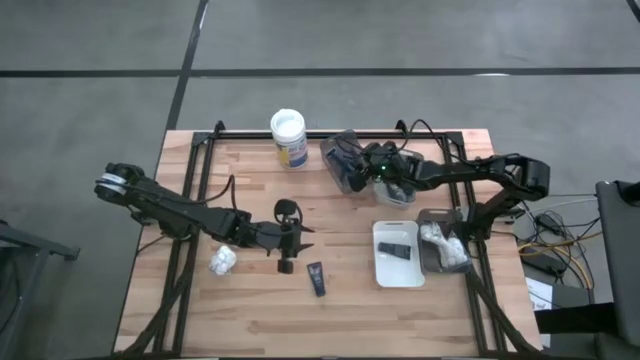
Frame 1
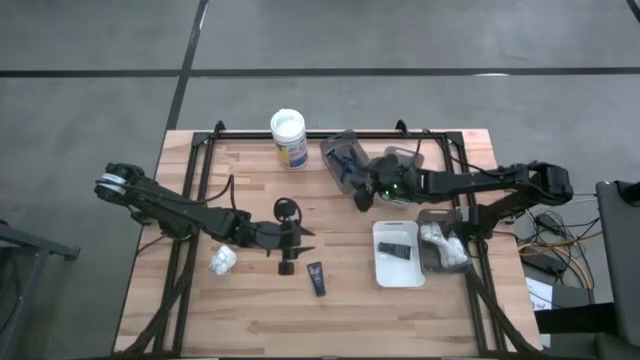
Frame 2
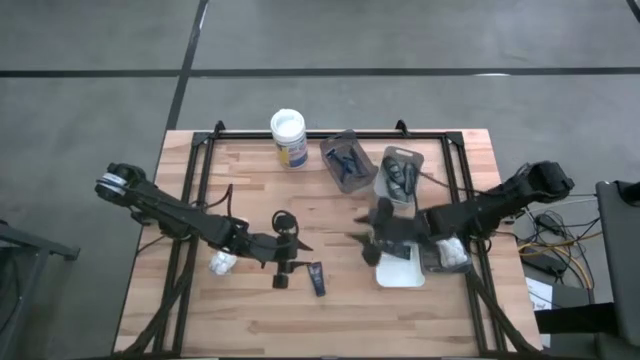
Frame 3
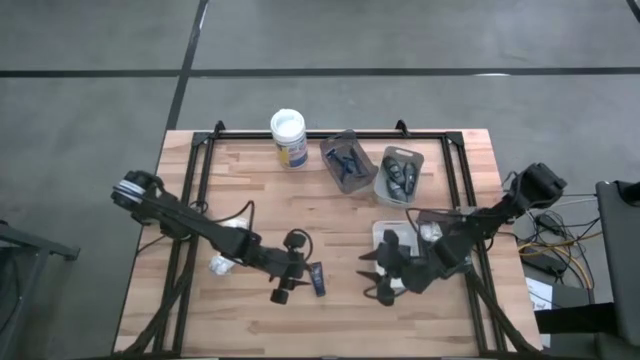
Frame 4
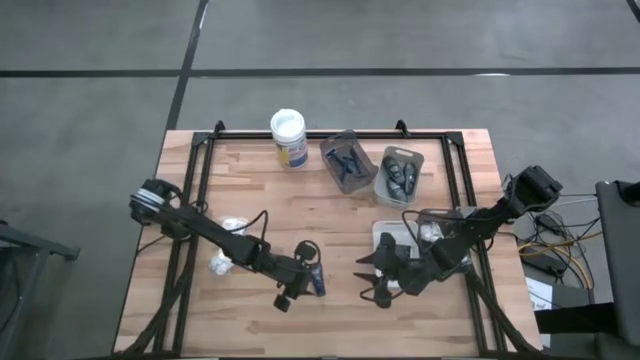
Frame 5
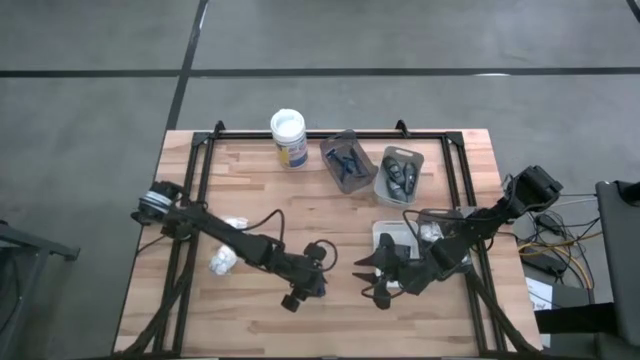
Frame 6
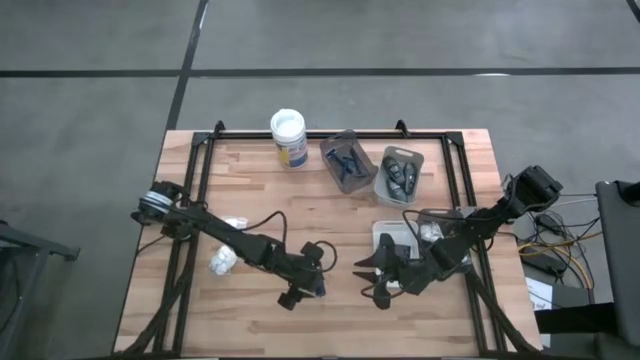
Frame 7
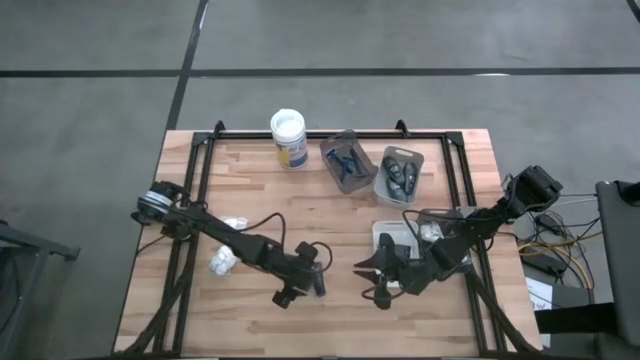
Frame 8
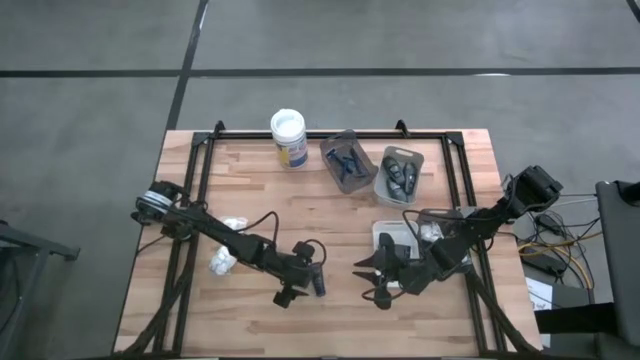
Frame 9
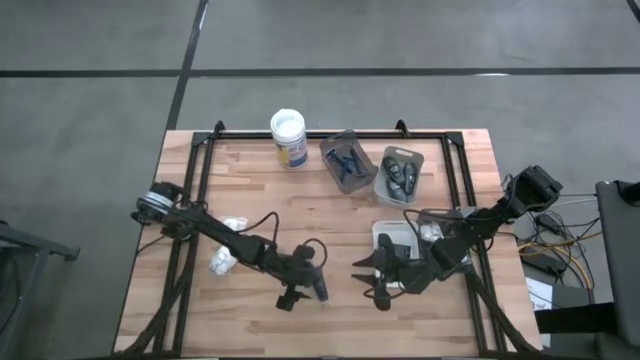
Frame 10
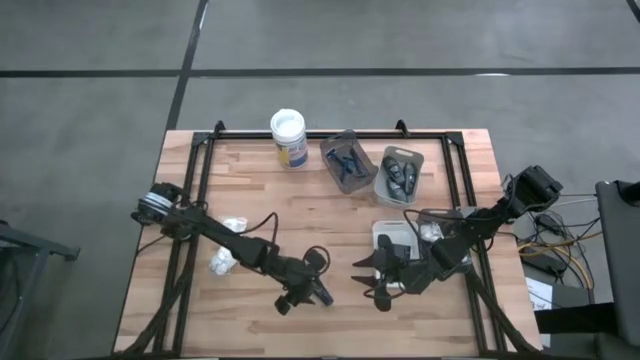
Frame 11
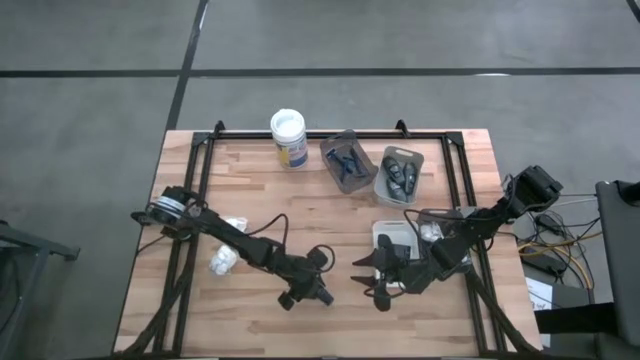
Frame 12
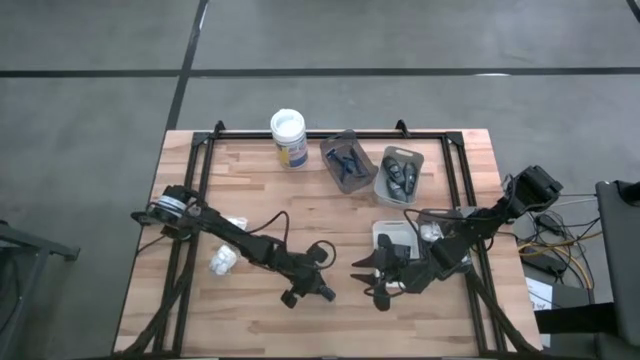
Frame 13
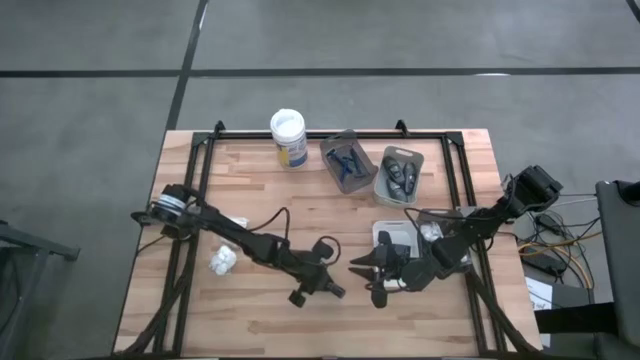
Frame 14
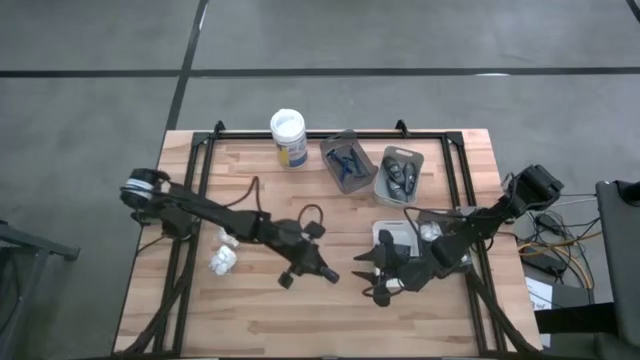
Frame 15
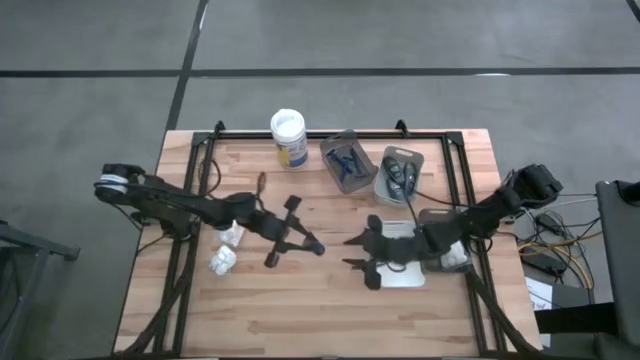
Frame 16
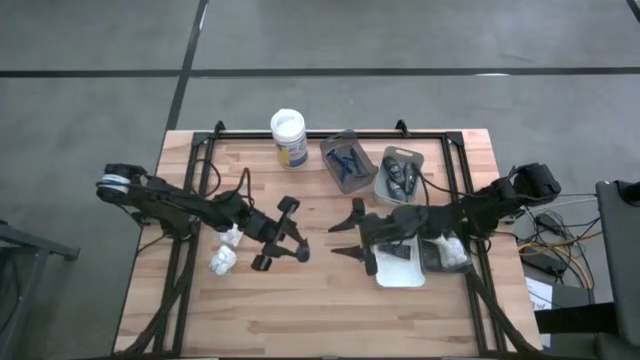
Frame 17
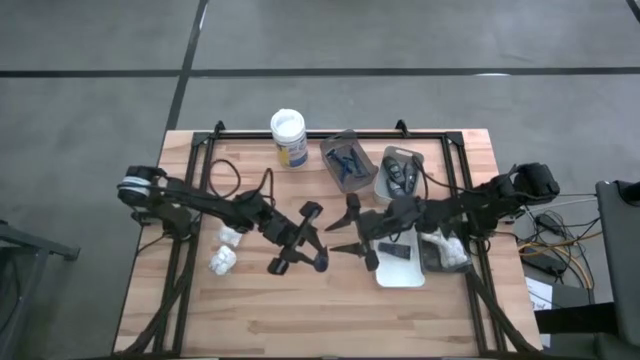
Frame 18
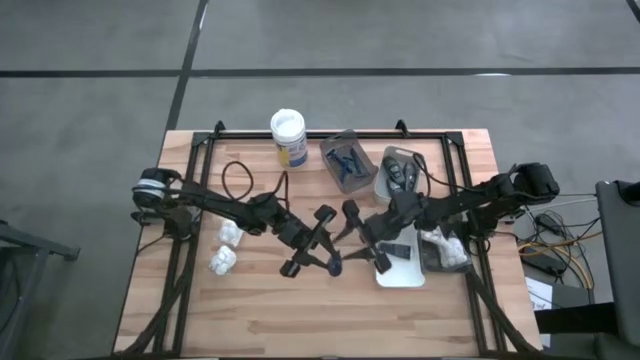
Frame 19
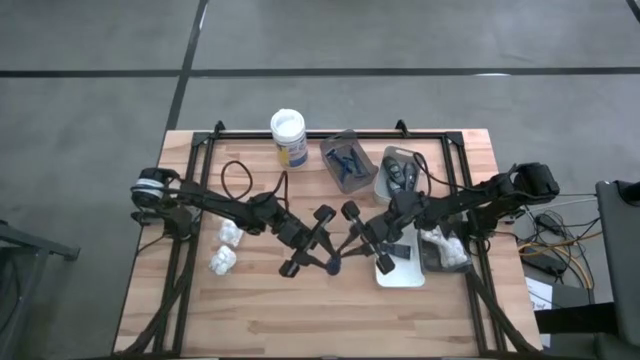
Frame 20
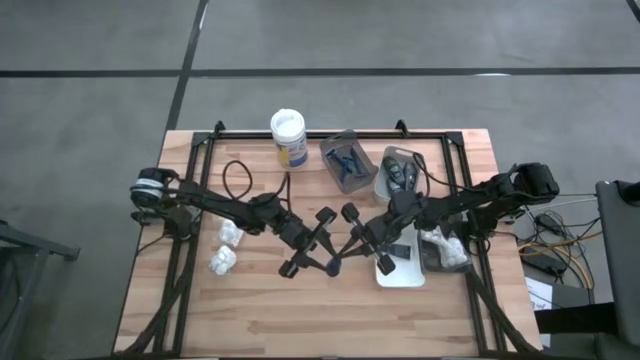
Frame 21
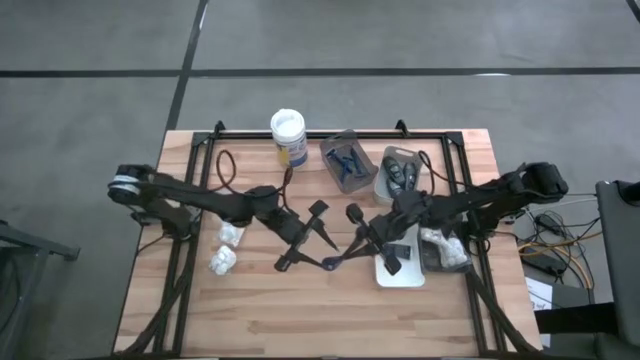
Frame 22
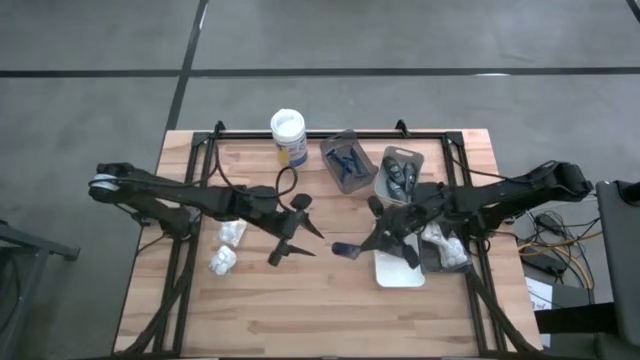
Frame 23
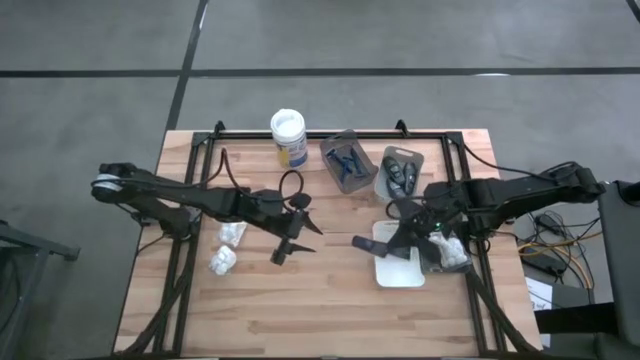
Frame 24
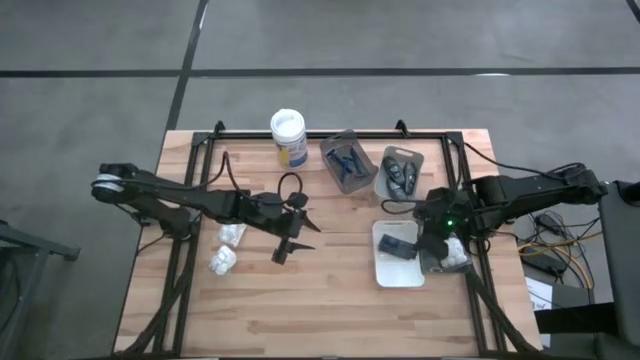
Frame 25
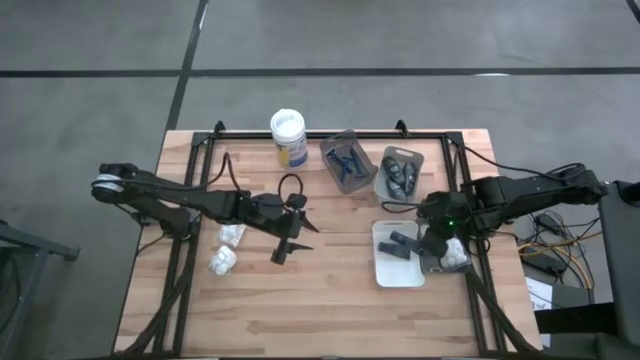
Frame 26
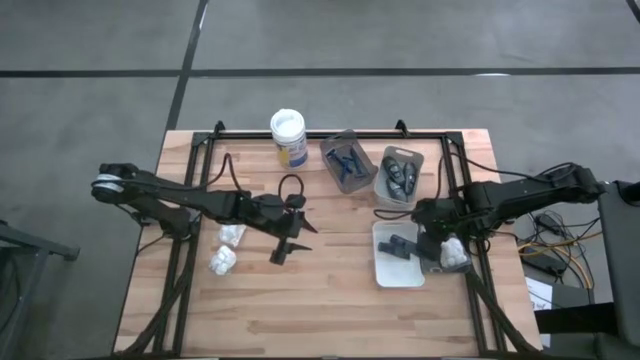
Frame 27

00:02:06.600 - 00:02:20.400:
Task: Pick & Place Travel size toiletries
Put the blue shaving cream into the white bin

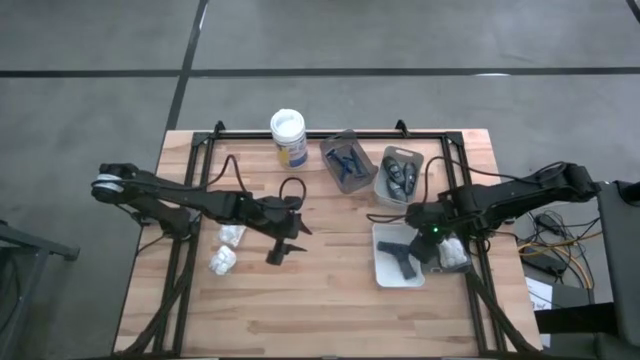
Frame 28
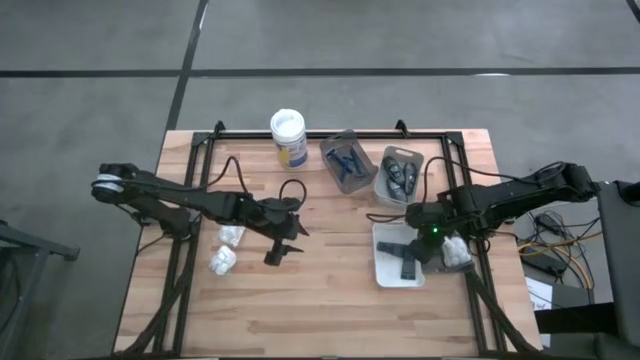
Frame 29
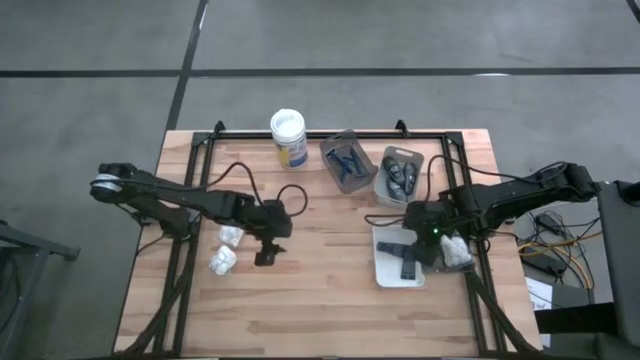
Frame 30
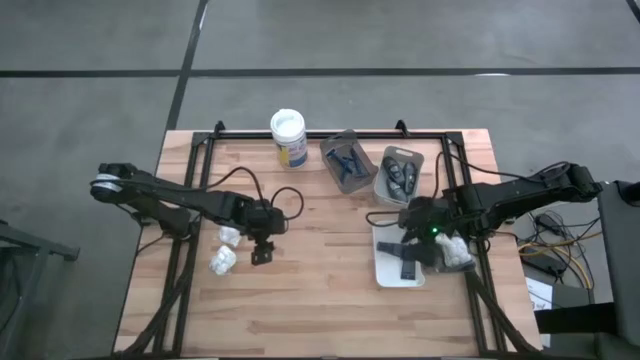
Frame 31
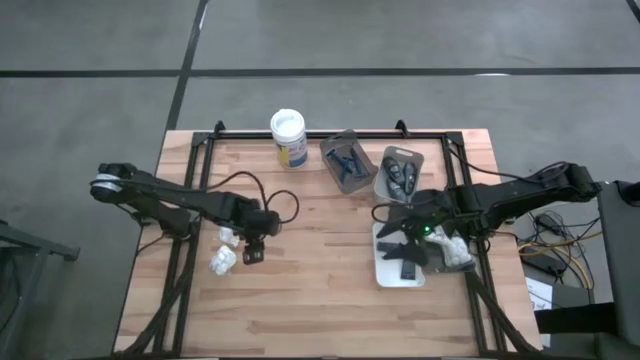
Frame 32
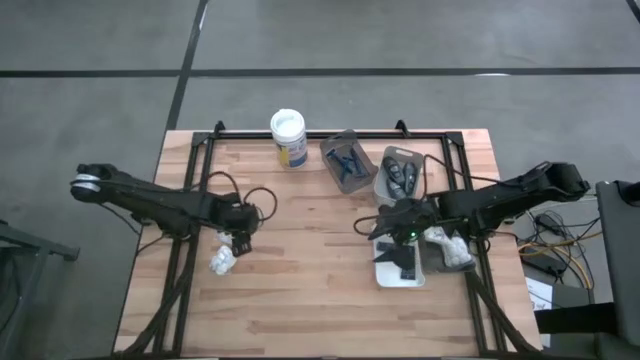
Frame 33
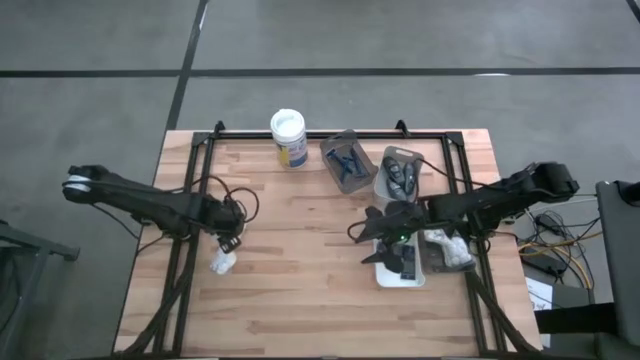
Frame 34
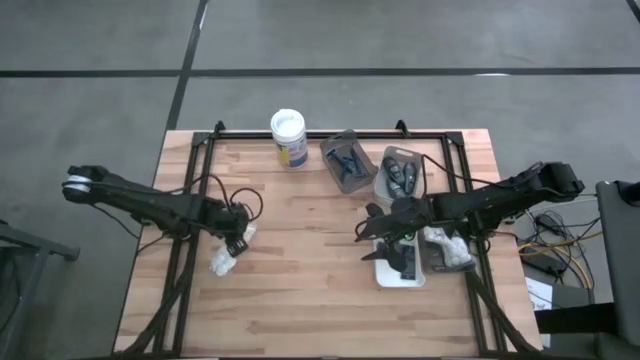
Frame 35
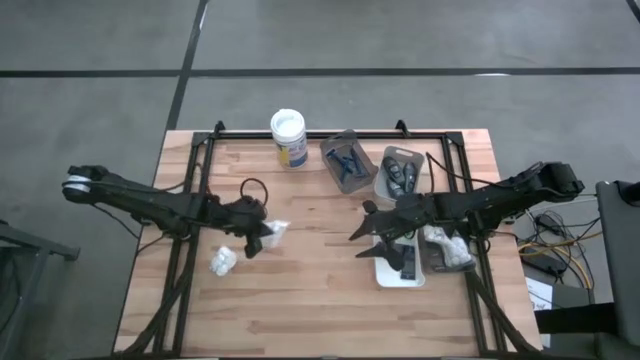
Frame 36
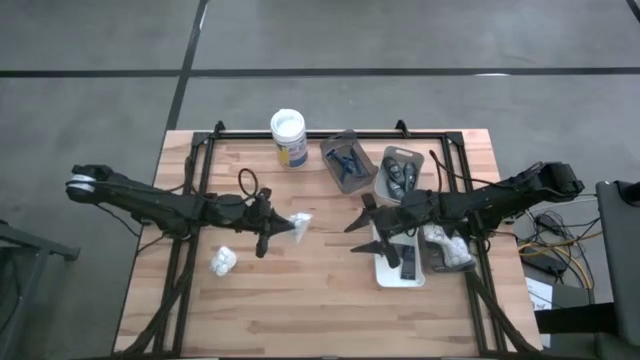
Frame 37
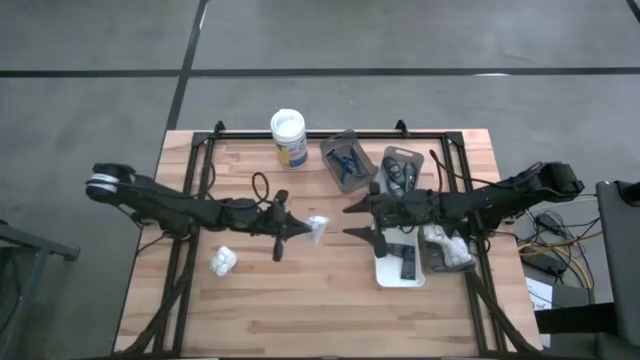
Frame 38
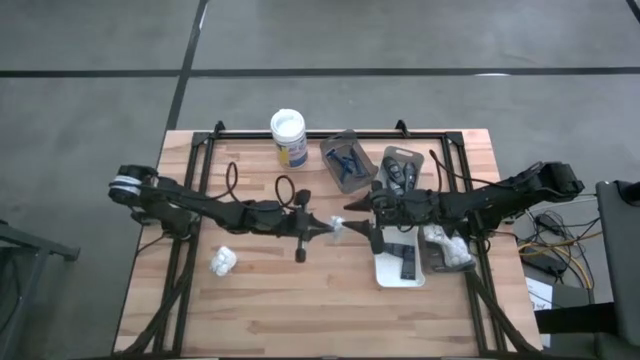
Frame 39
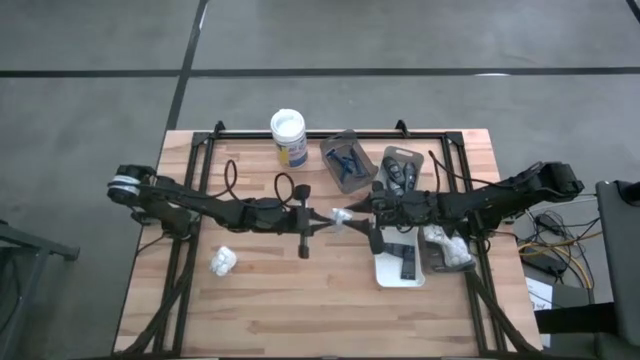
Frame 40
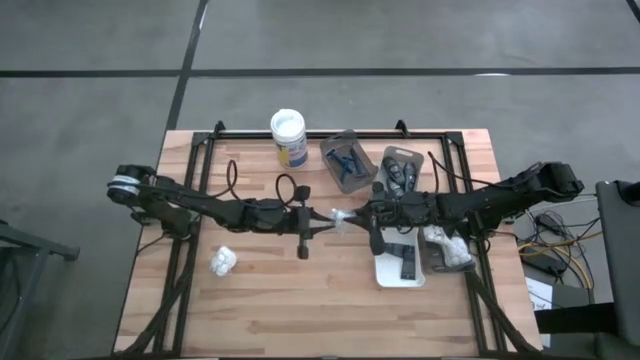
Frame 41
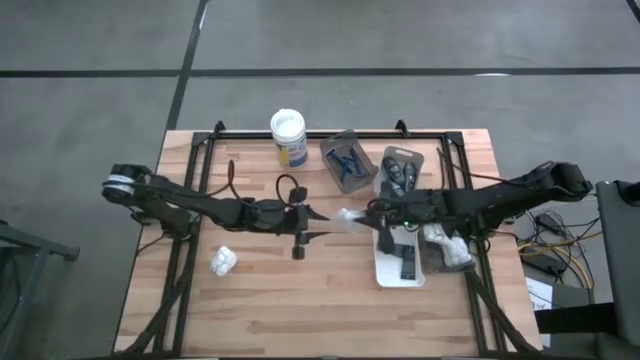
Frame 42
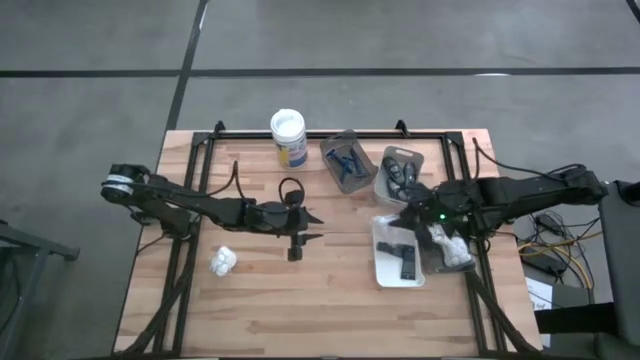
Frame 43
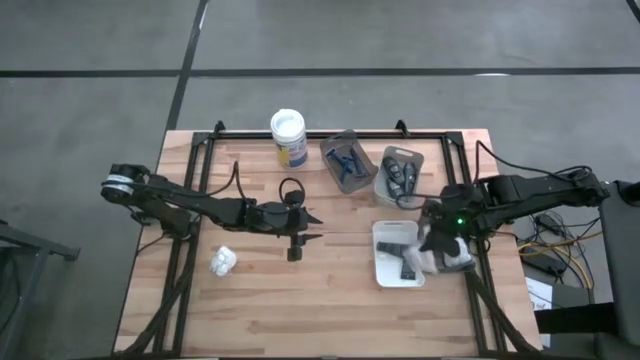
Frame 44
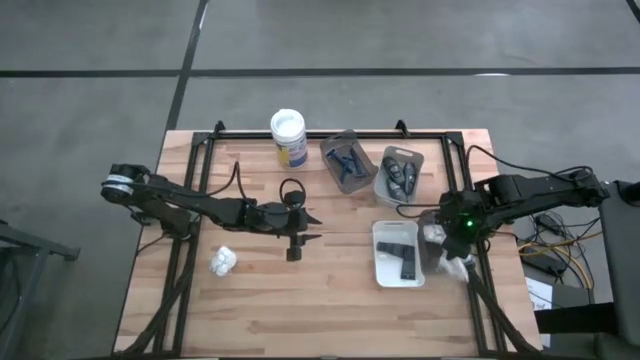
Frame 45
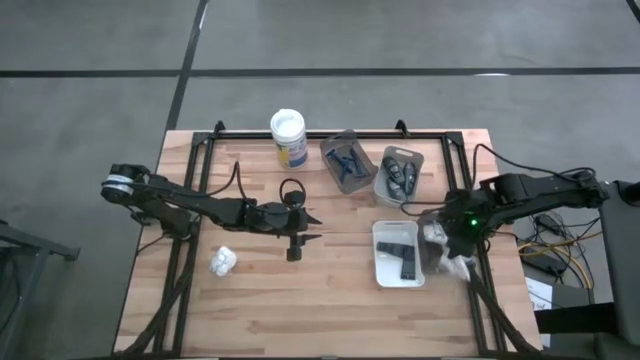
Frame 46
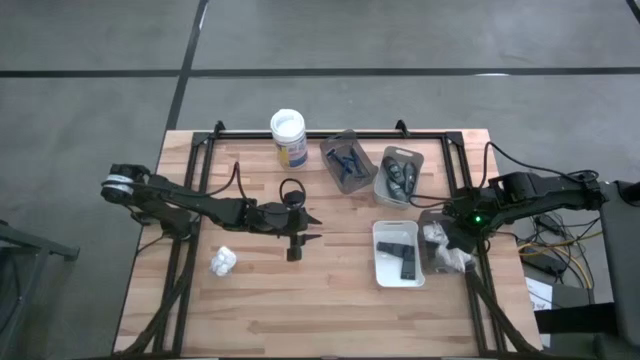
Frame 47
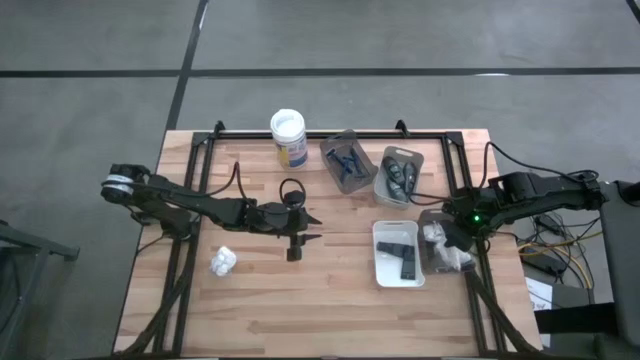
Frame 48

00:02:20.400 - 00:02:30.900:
Put the white cotton pack into the bottom black bin
